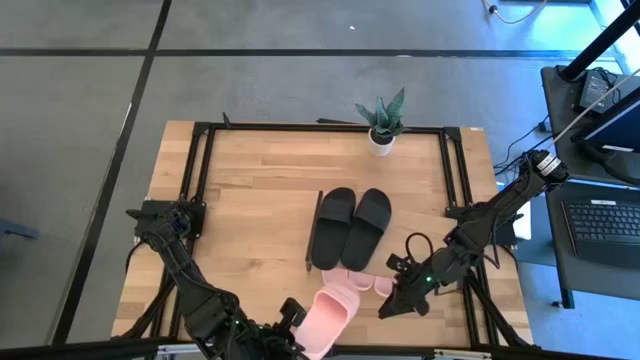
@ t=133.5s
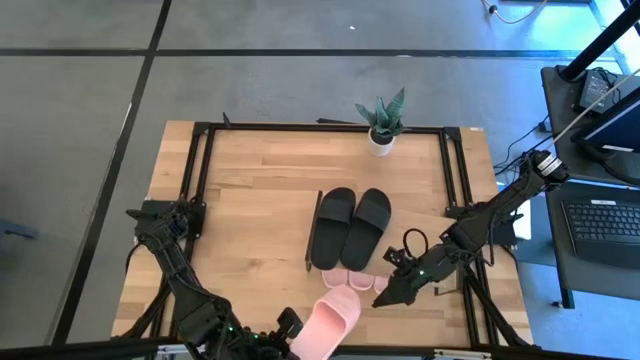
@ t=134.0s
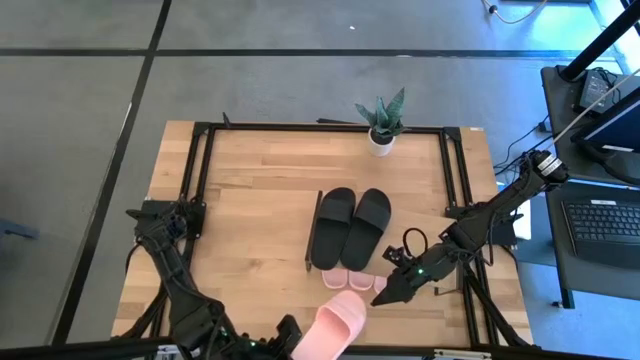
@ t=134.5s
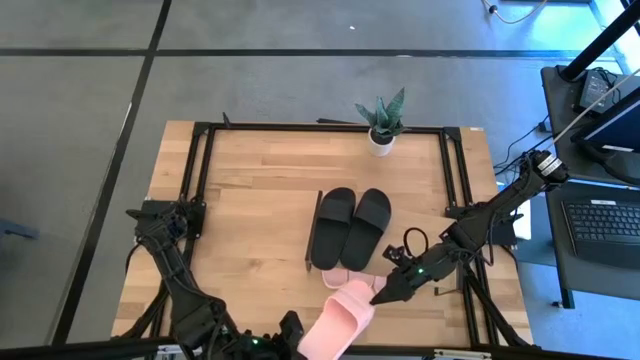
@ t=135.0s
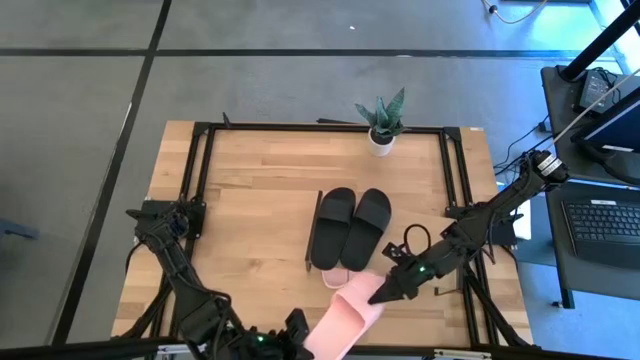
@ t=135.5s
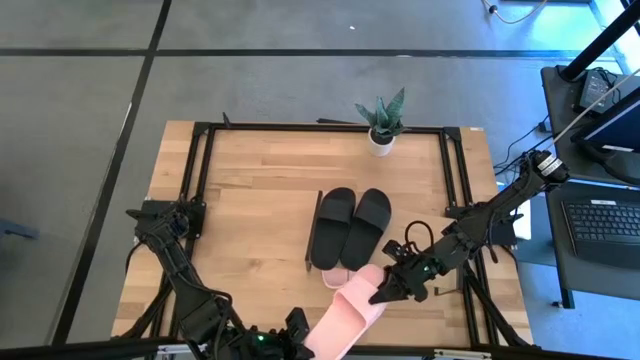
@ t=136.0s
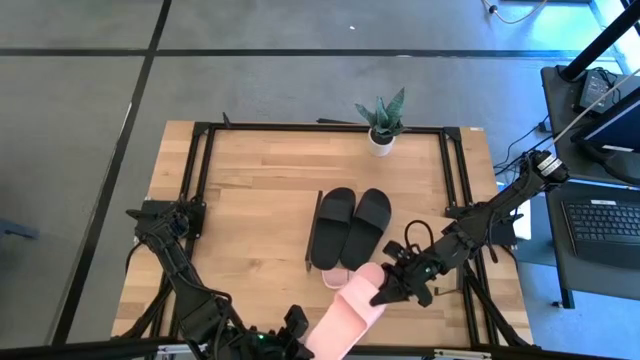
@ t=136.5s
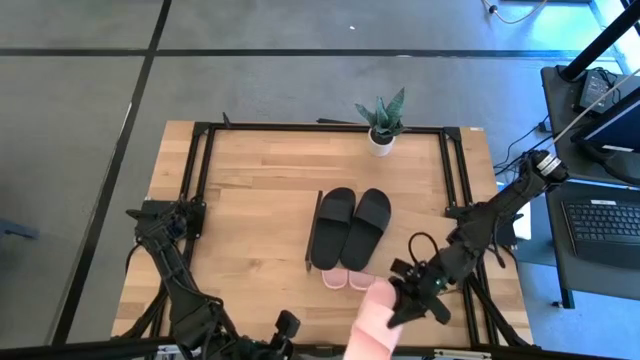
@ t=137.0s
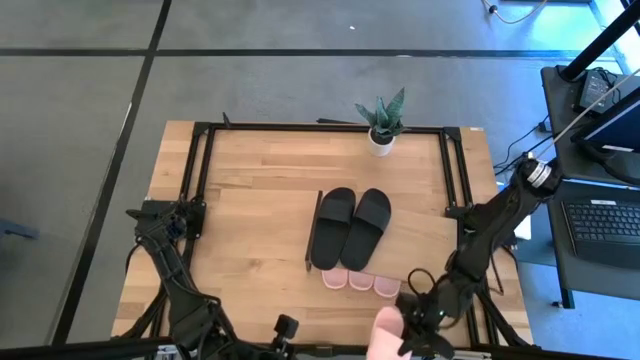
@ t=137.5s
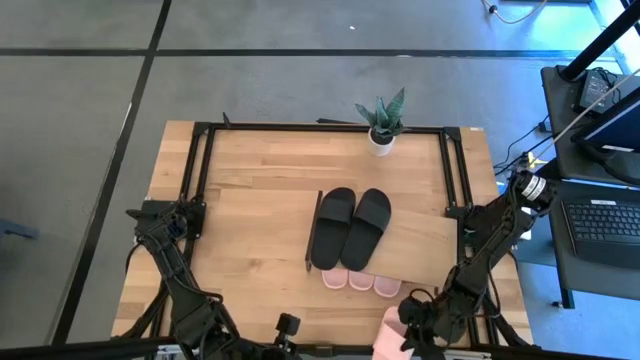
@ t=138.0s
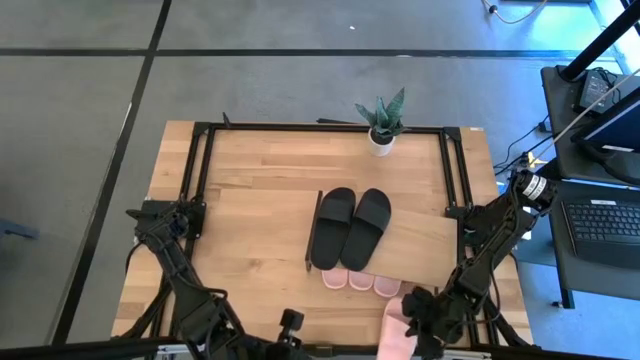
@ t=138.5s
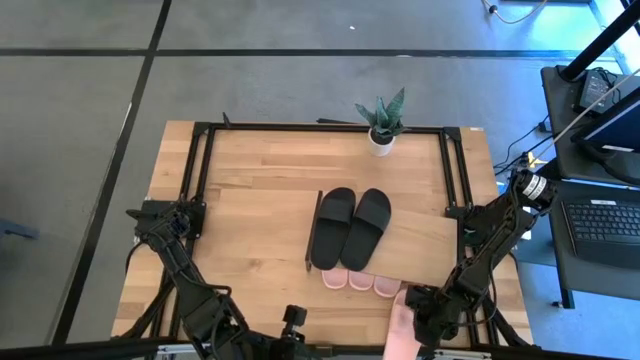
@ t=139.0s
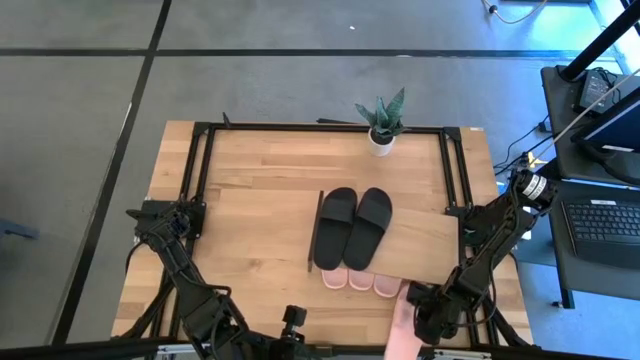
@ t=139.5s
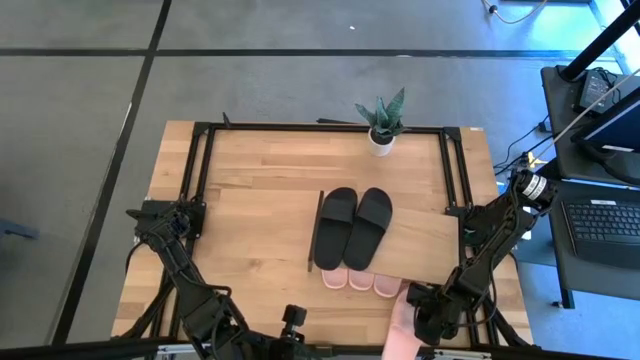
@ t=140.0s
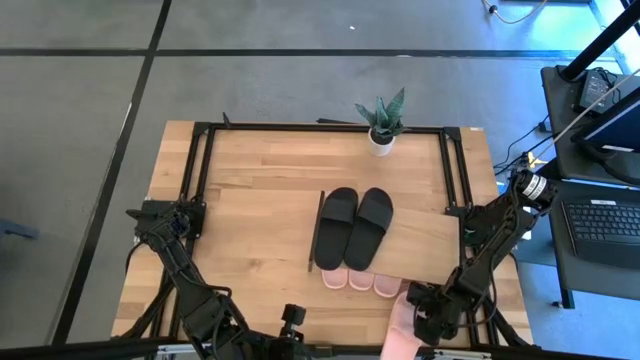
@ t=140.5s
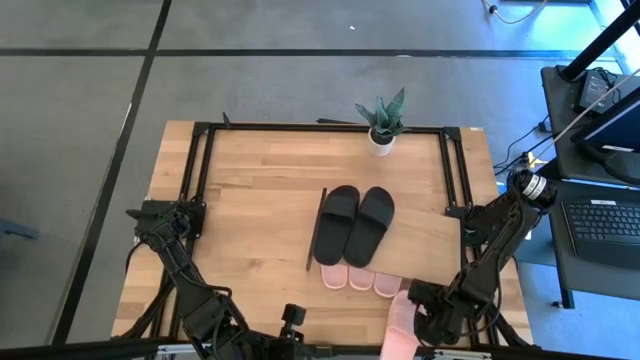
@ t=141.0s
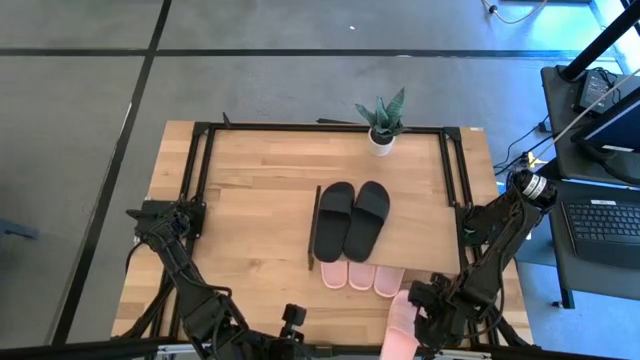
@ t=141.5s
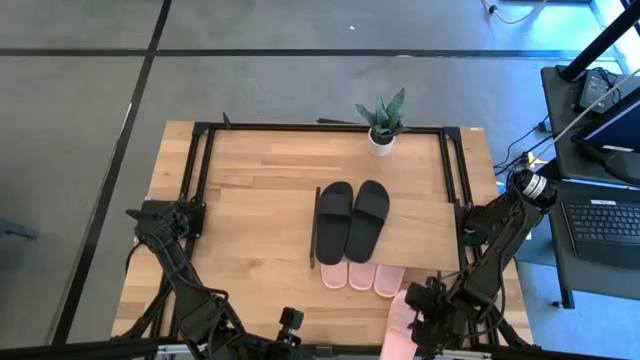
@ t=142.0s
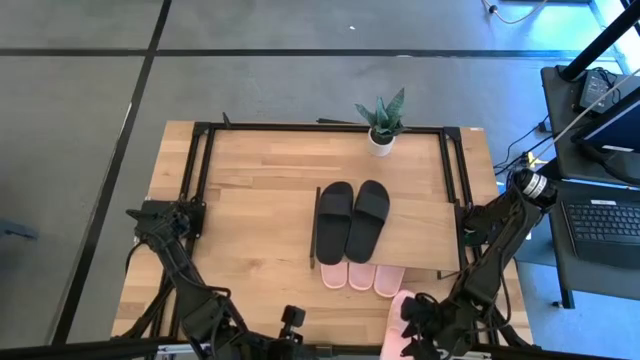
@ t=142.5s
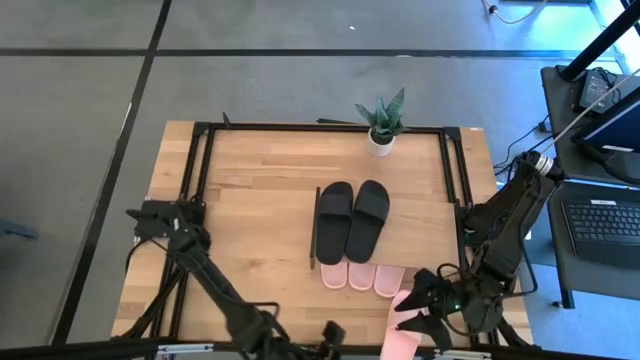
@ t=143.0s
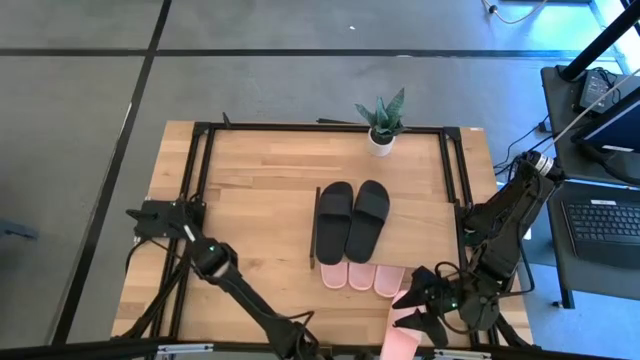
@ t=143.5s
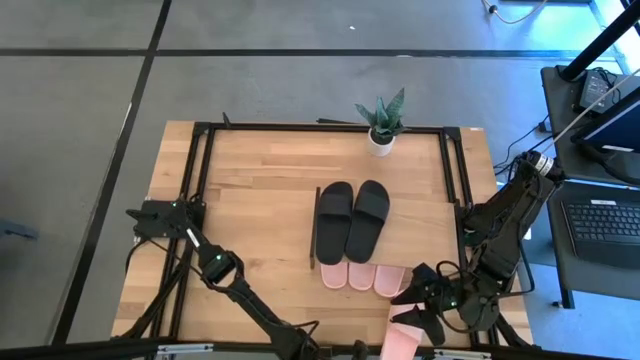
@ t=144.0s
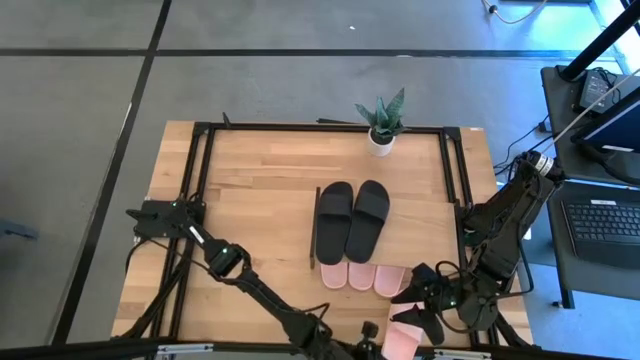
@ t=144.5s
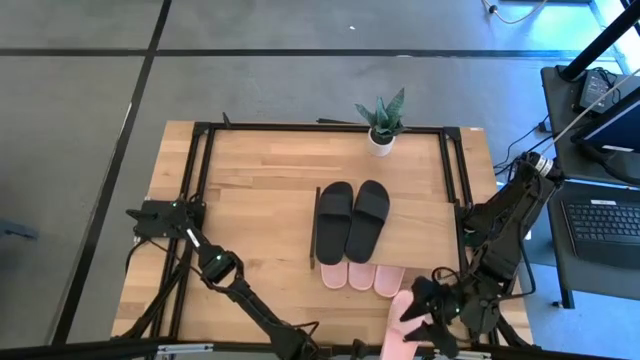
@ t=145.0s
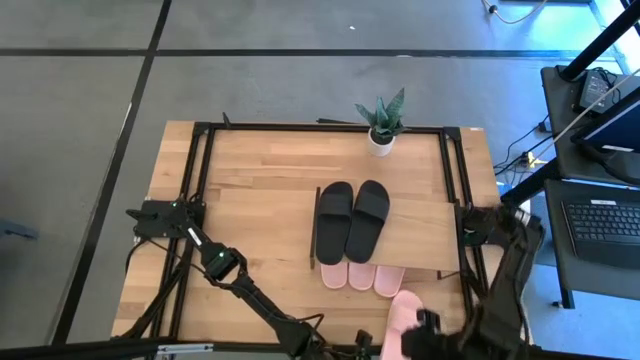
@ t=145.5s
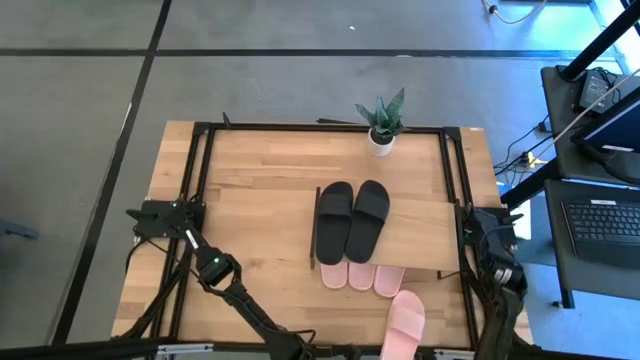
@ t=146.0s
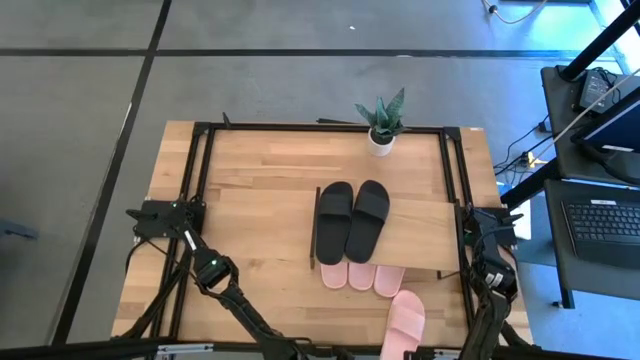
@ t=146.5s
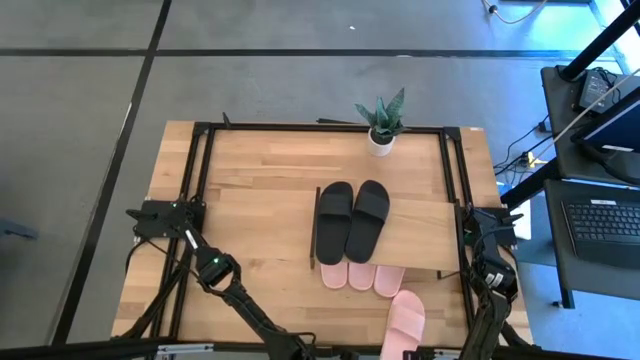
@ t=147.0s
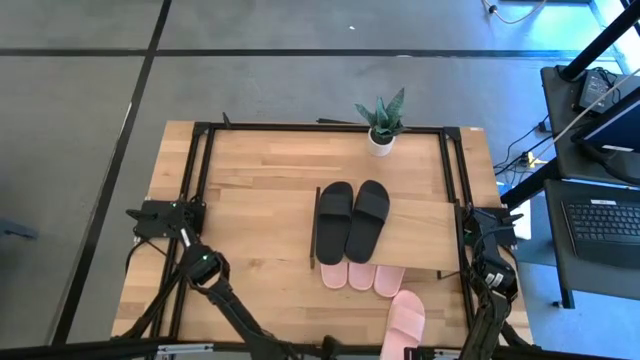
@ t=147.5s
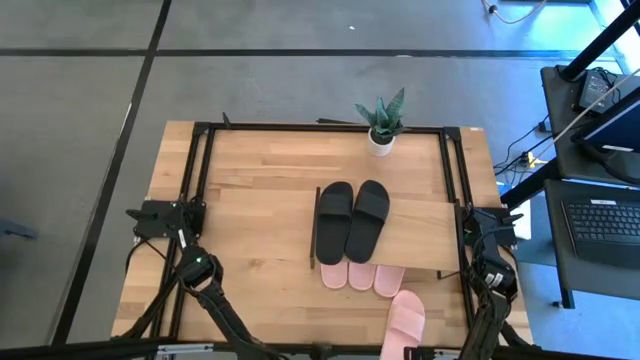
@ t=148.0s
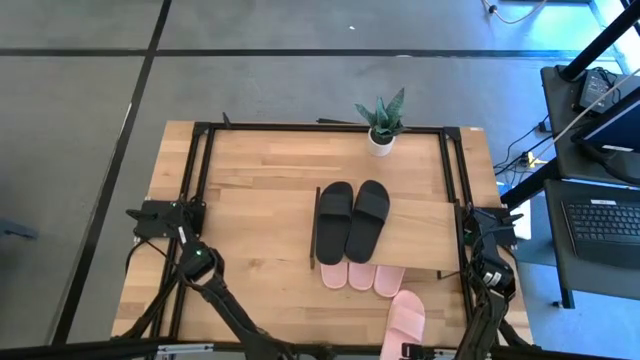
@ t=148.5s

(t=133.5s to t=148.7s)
Task: Pick and place slides into the shelf
Put the pink slipper under the shelf

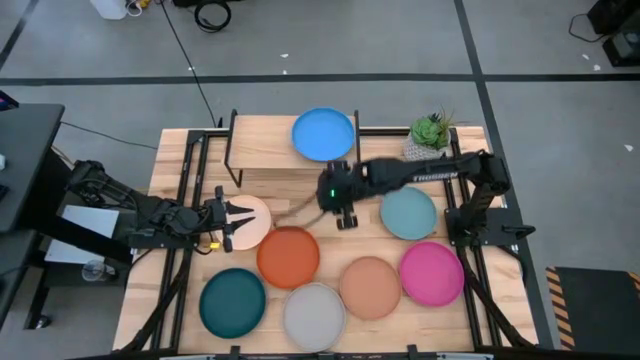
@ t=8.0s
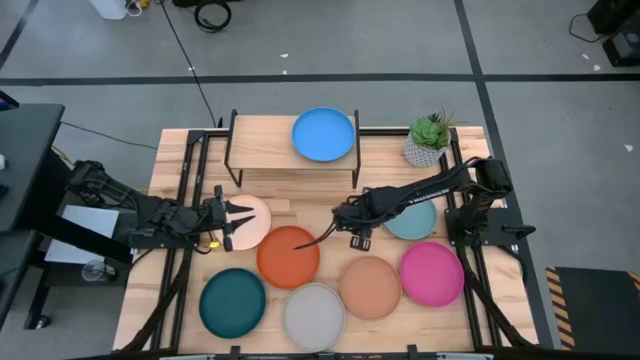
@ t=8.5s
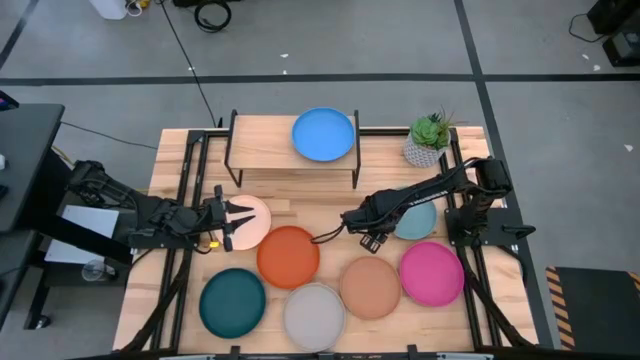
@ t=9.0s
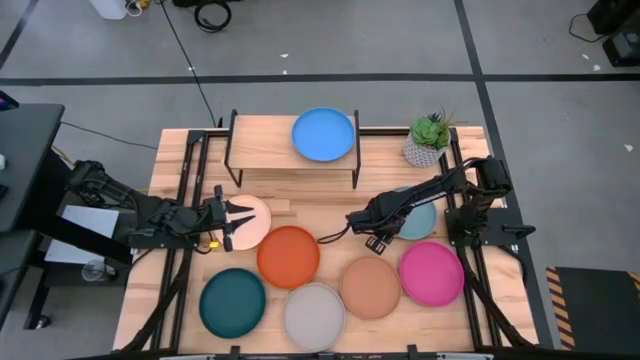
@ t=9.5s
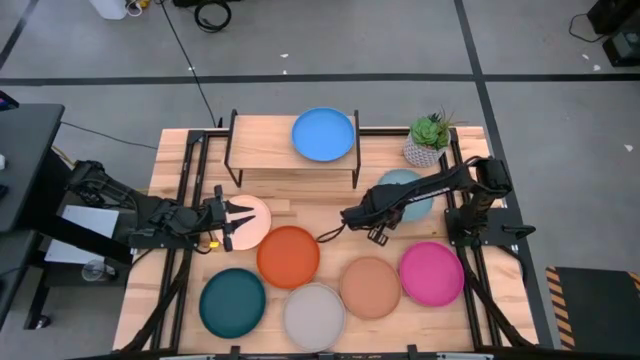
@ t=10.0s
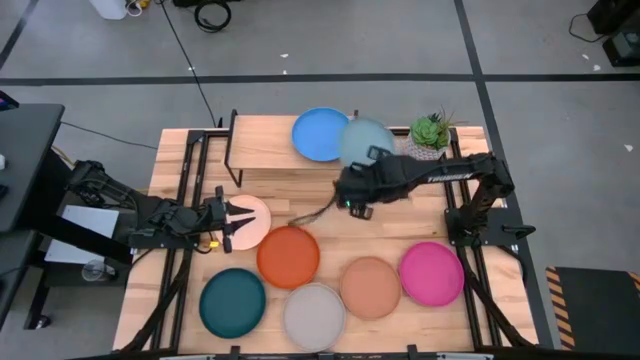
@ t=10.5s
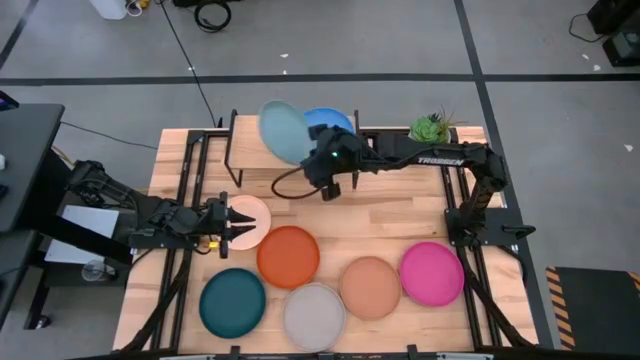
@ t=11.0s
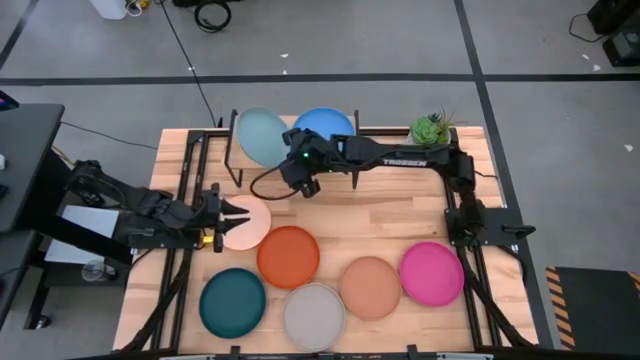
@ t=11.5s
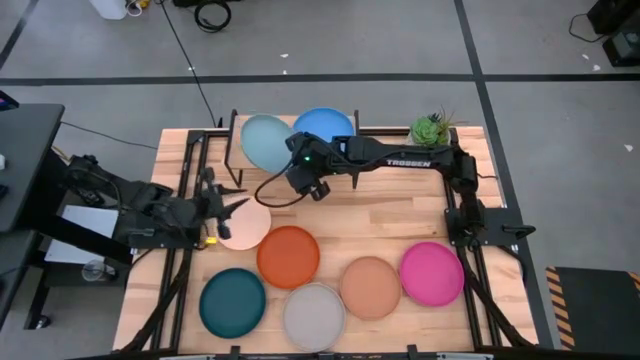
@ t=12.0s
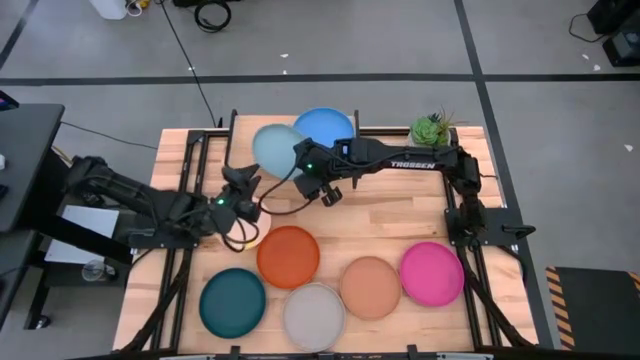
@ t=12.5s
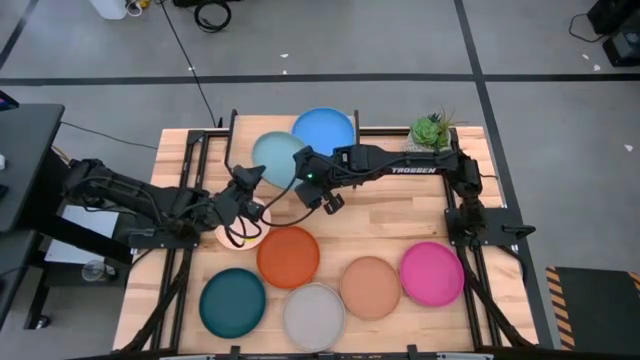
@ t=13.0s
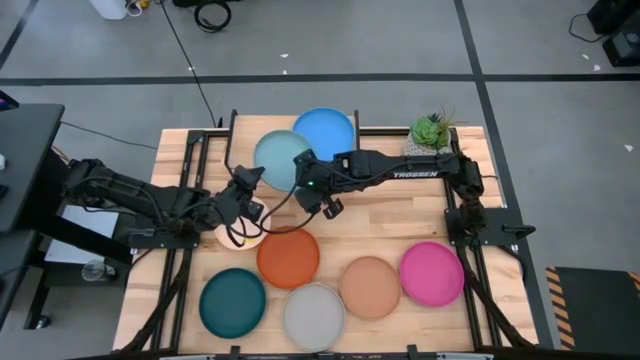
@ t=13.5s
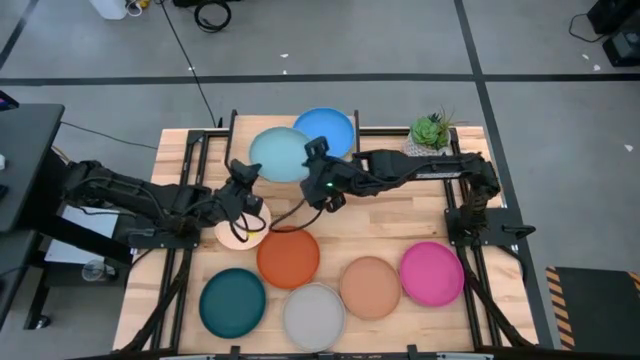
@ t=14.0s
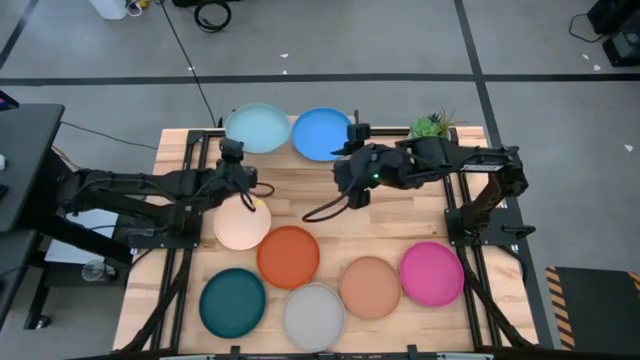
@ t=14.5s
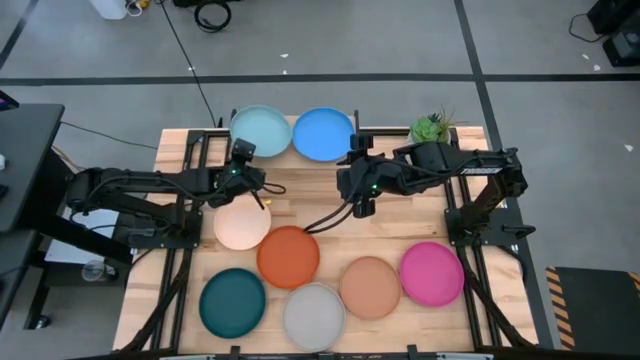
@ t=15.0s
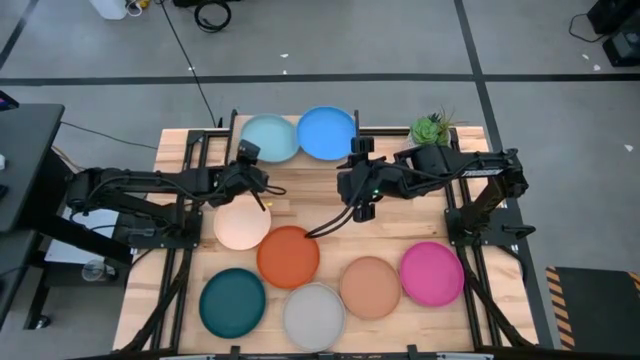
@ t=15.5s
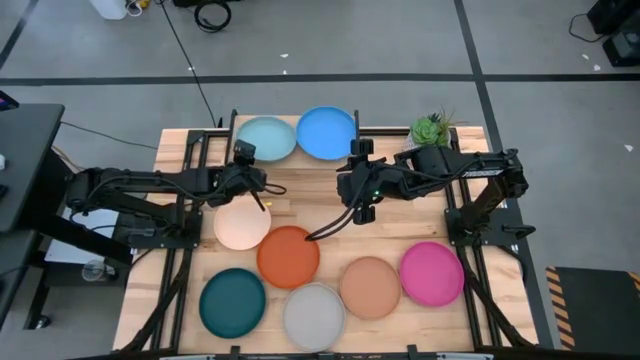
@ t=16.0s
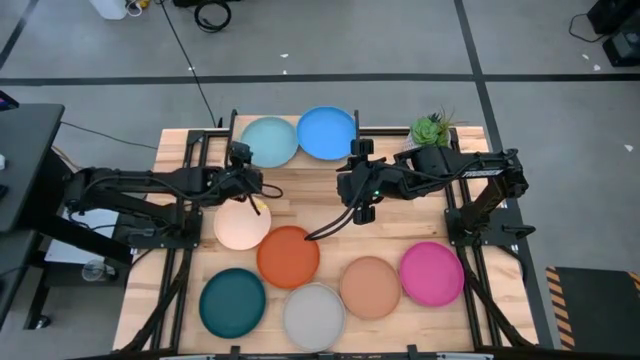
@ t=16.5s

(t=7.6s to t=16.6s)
Task: Place and stack plates onto a shelf
Put the light green plate on the shelf
